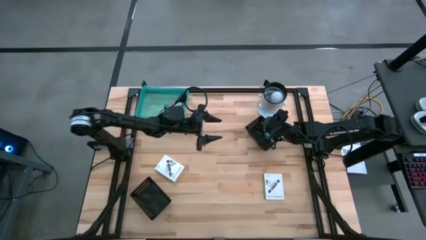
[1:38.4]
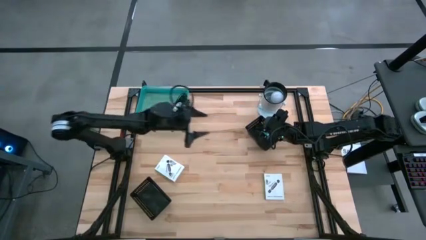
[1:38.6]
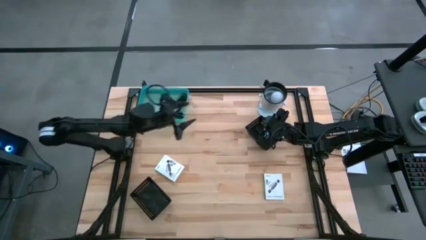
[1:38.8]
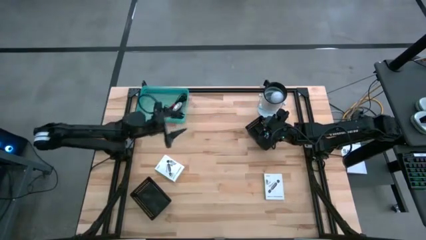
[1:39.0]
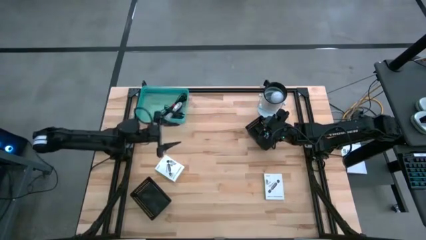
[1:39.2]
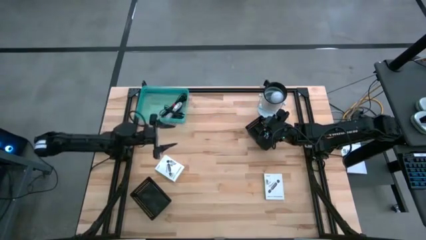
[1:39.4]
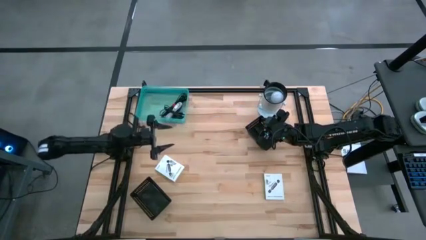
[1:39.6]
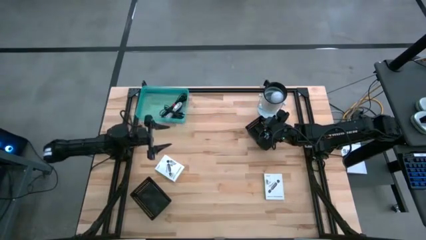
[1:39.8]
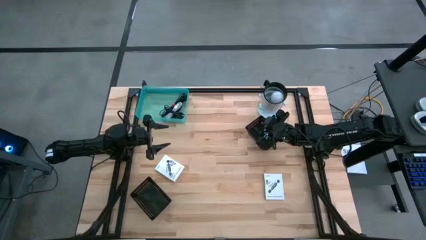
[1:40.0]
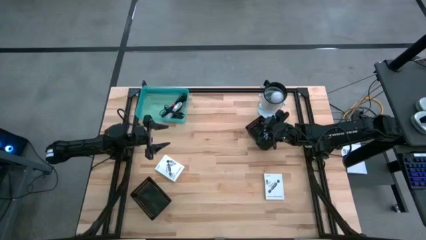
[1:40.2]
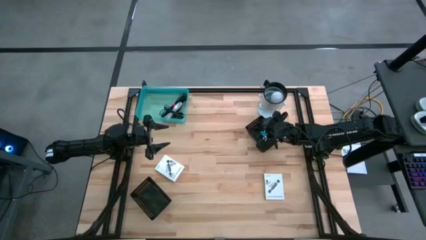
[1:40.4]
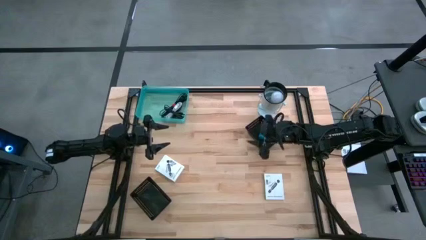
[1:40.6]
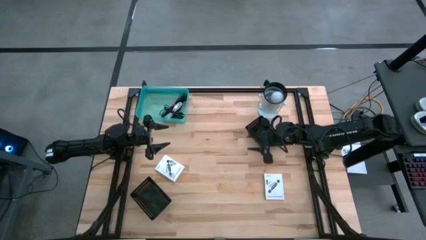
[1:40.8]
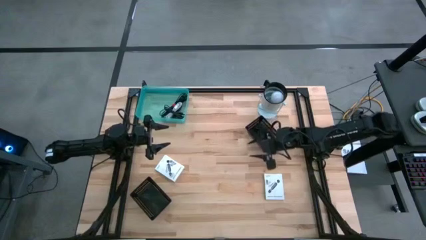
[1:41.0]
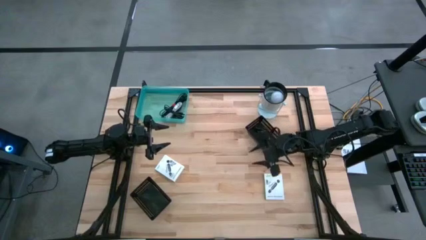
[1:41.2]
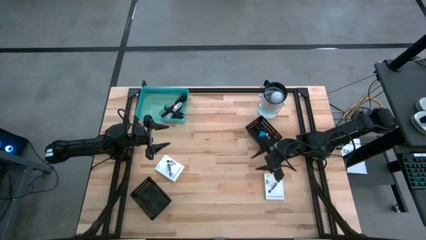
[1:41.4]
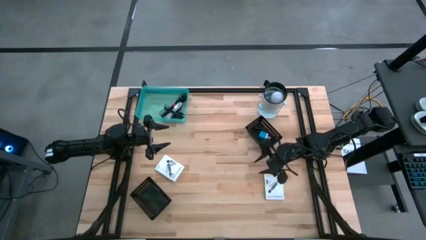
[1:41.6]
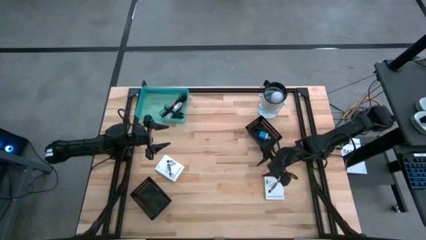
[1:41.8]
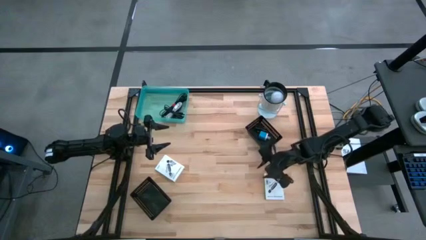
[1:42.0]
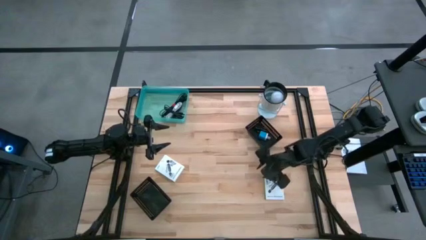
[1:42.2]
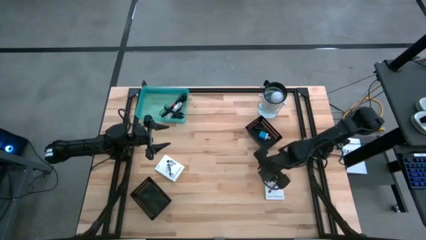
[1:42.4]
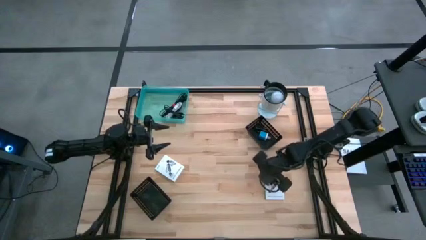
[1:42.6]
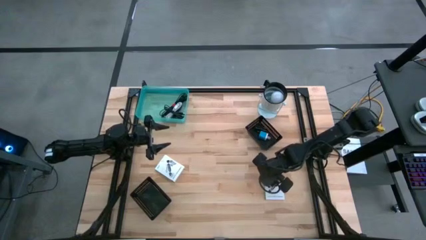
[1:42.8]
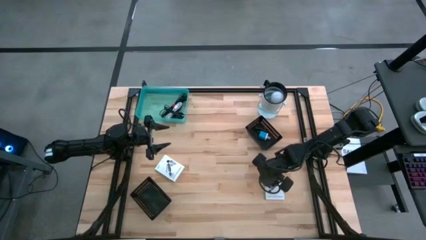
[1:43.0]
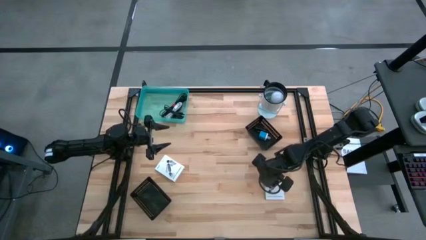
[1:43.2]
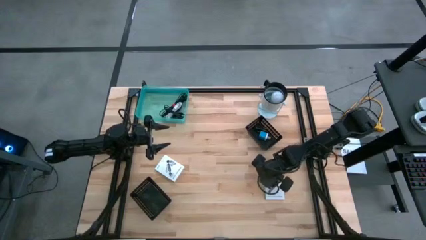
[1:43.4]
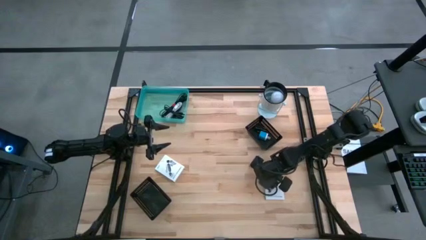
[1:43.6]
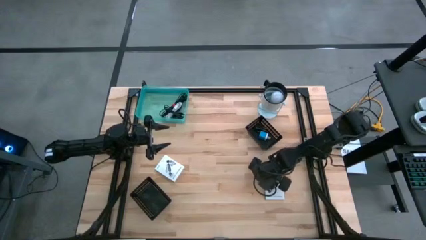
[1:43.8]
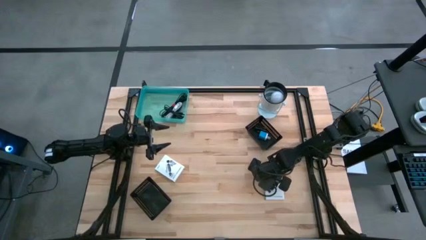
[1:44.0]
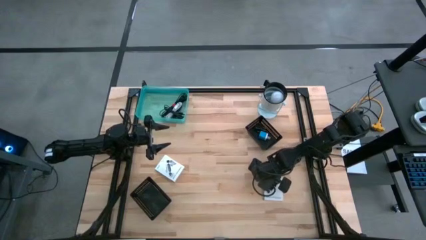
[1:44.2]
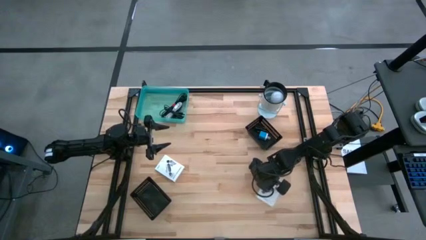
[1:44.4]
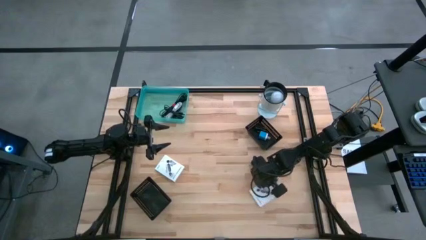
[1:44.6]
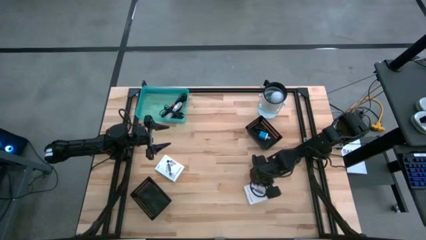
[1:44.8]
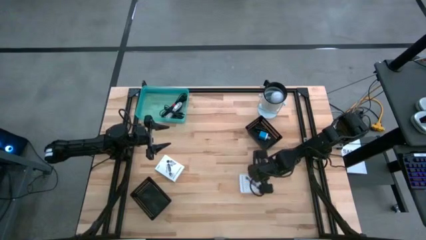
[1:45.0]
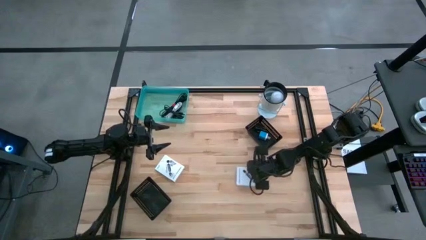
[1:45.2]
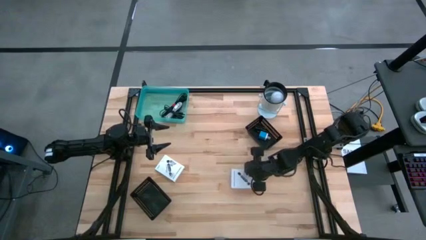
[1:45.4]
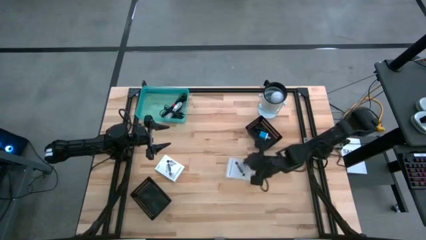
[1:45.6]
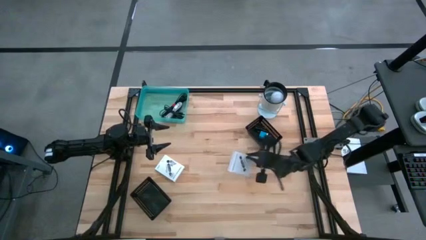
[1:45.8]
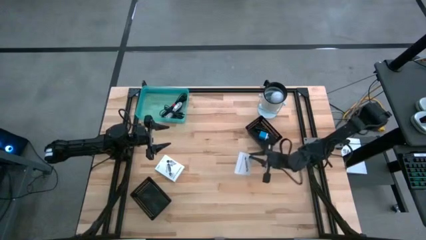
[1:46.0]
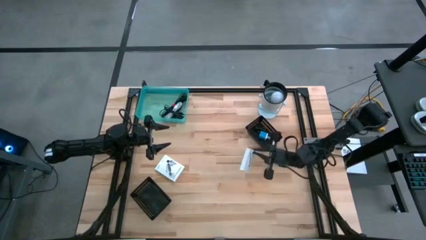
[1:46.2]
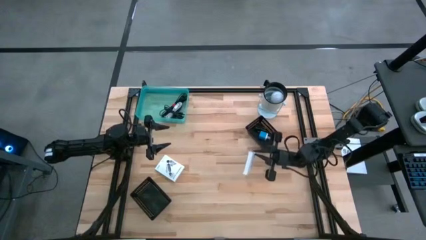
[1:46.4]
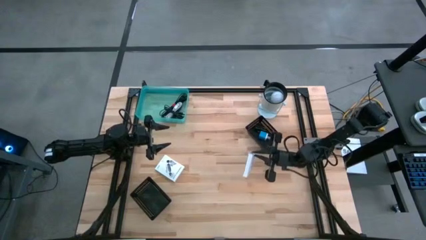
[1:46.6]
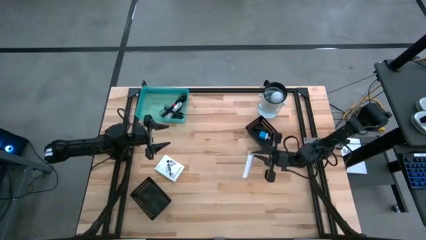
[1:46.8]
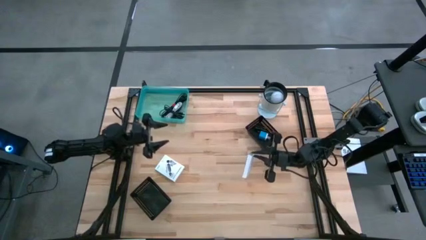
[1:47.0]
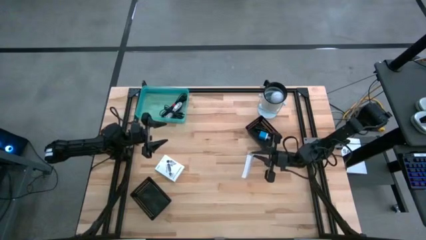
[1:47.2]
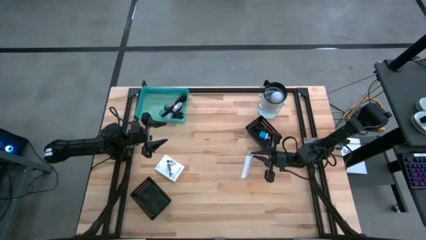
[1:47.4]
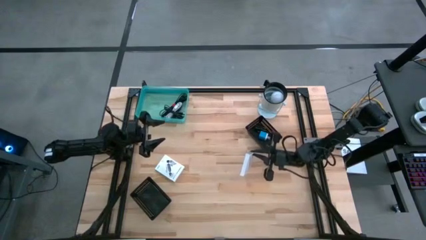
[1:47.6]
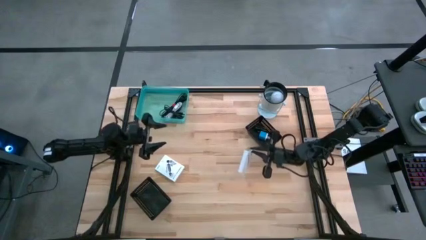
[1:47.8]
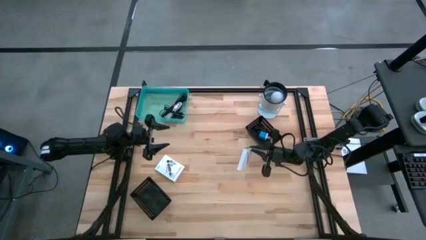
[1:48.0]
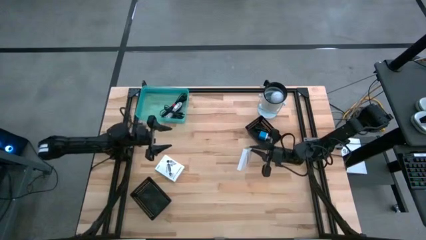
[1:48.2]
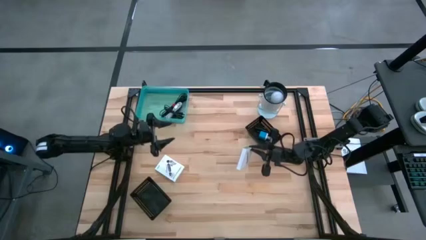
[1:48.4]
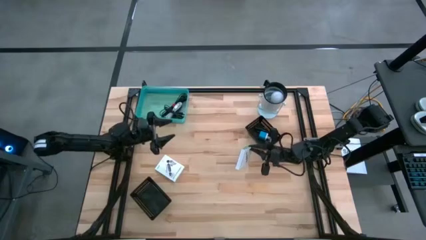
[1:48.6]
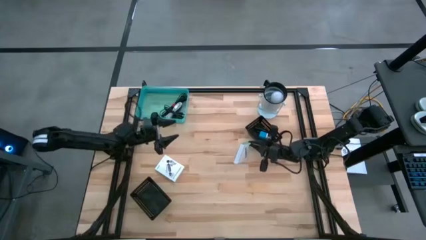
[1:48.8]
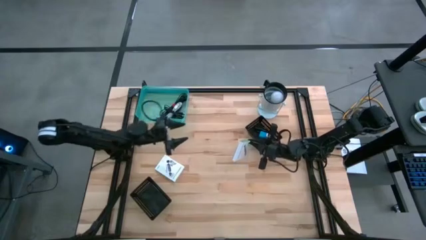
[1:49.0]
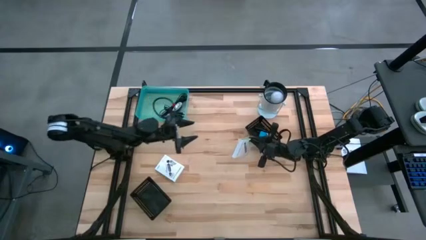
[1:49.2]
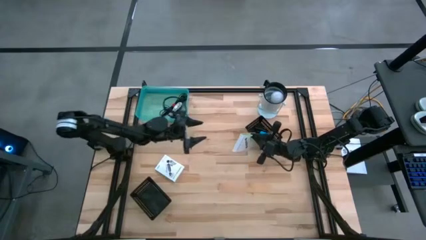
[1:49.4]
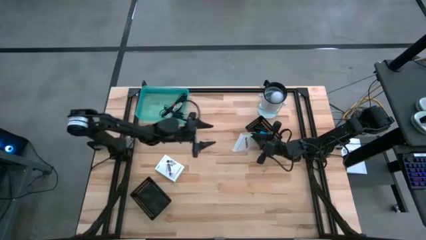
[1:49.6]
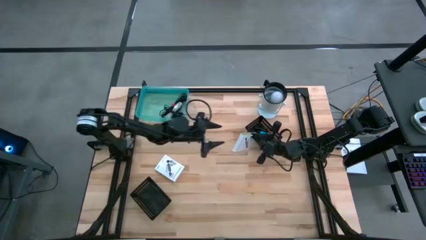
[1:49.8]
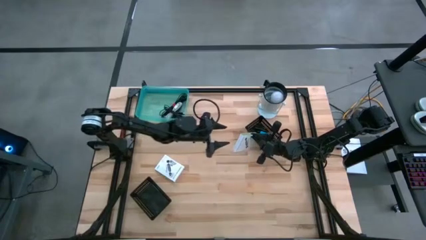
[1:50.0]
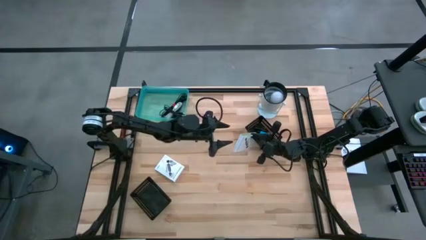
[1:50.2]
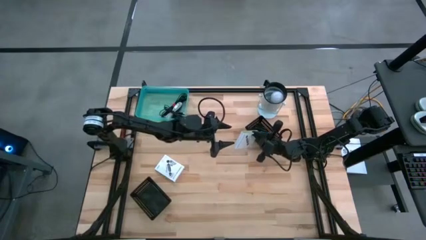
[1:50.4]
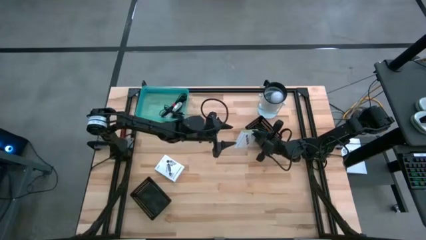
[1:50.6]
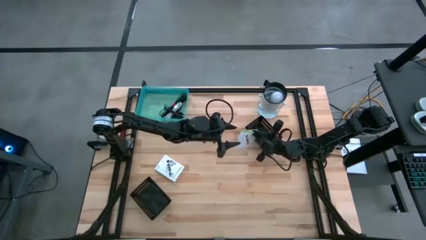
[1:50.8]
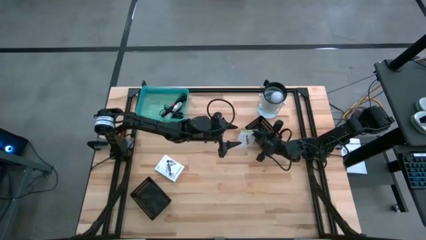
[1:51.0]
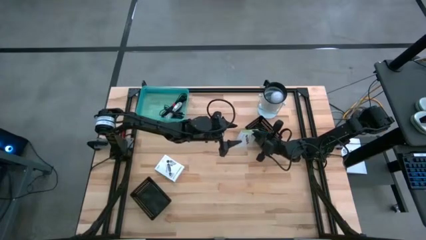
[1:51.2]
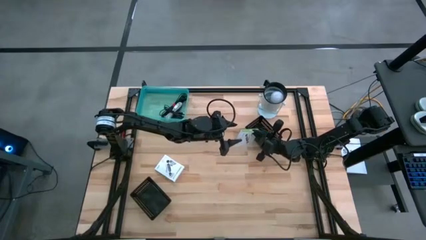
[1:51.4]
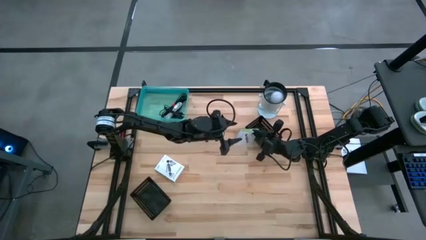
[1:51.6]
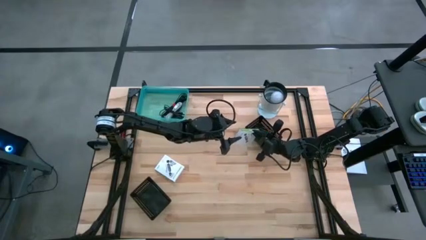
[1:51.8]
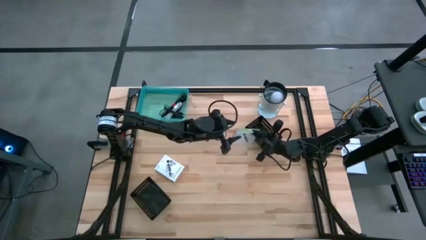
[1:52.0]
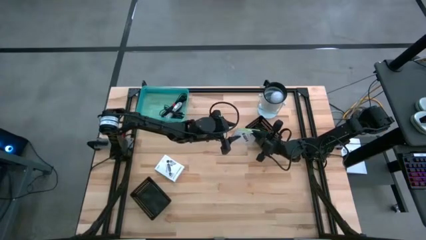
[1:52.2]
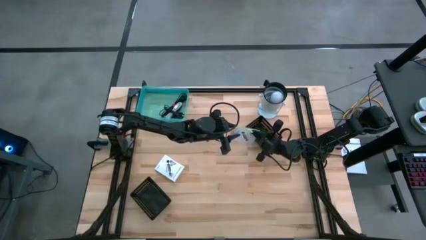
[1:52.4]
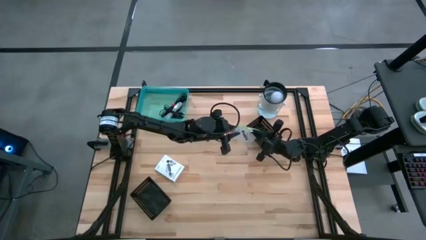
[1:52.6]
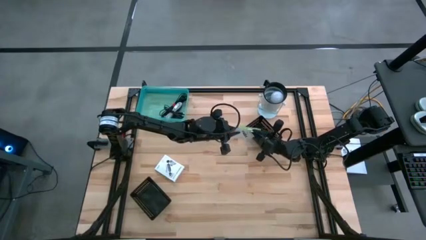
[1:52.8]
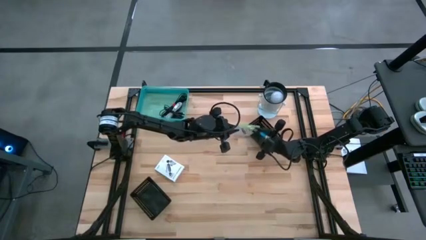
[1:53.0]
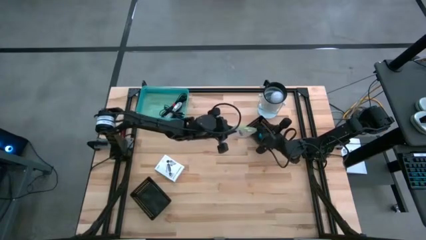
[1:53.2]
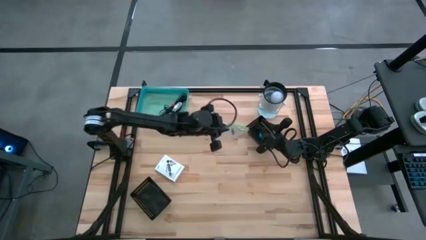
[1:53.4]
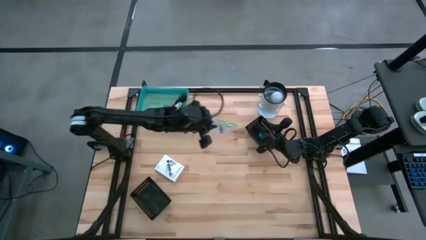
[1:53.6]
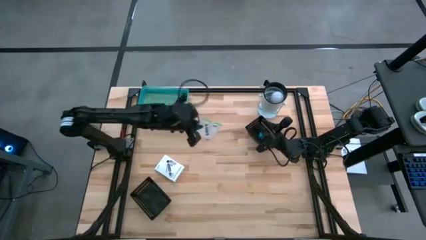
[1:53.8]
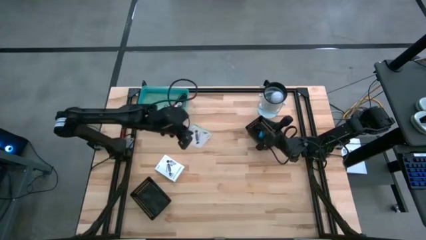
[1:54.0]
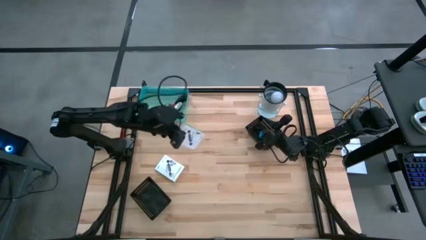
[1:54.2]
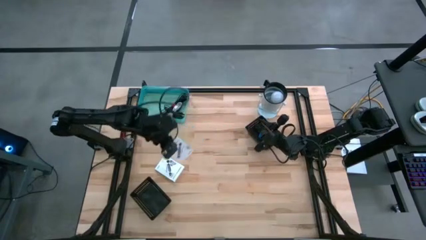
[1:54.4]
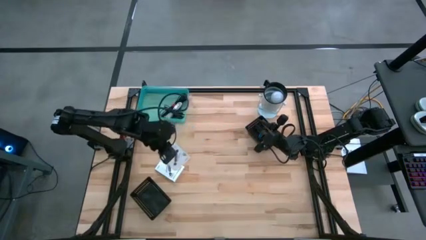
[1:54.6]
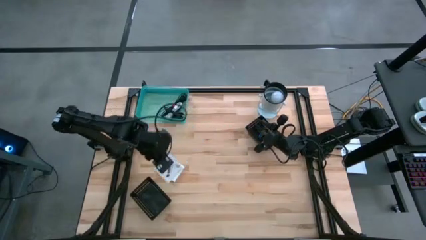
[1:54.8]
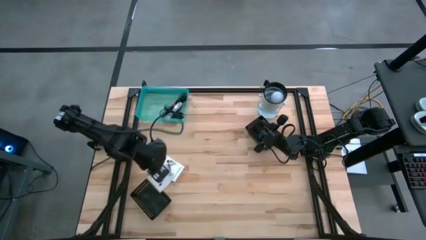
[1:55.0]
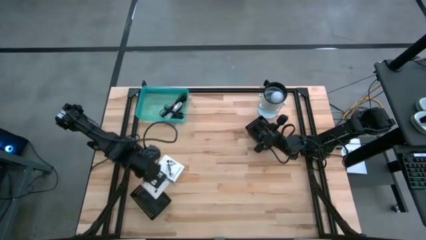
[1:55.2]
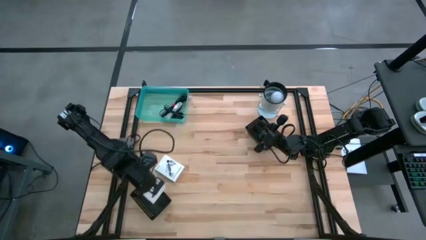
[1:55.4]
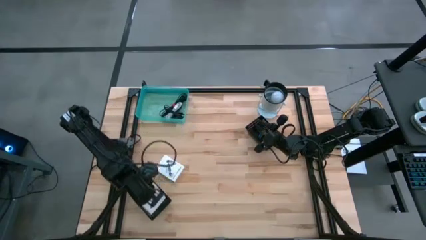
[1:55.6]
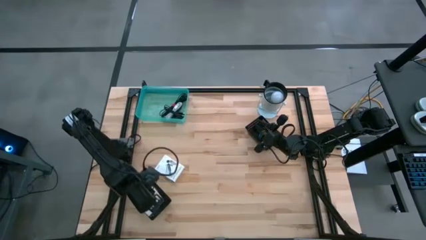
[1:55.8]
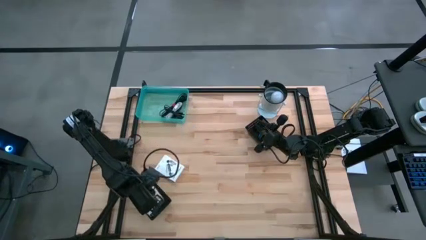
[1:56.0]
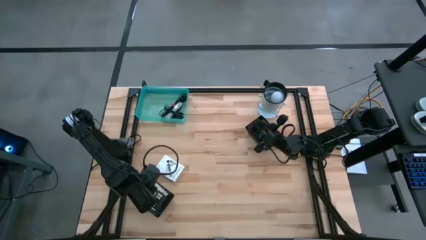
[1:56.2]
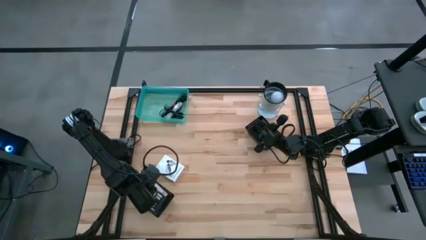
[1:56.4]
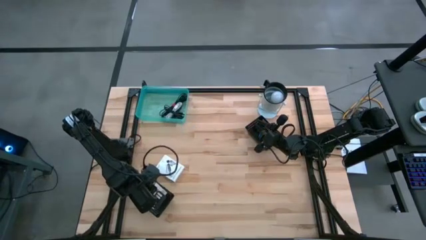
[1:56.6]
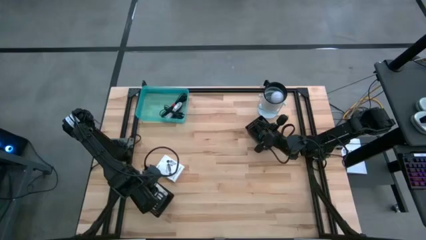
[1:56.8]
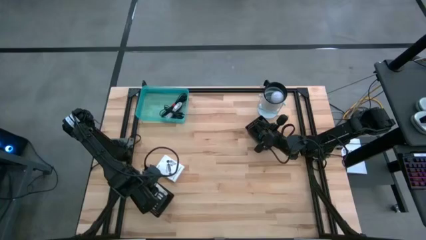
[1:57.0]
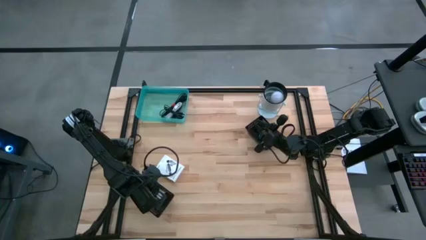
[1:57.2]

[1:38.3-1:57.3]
Task: Pick and place items into bin
Put the right white card reader box into the bottom black bin
